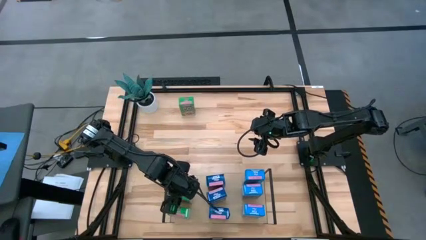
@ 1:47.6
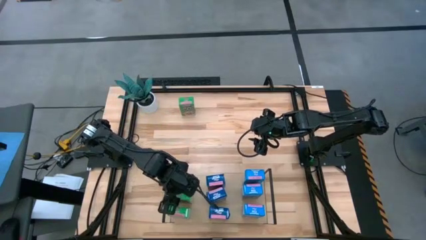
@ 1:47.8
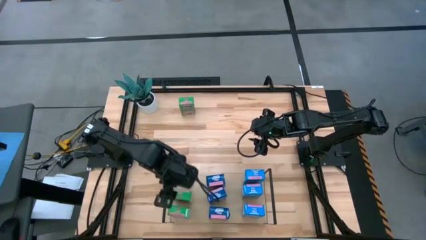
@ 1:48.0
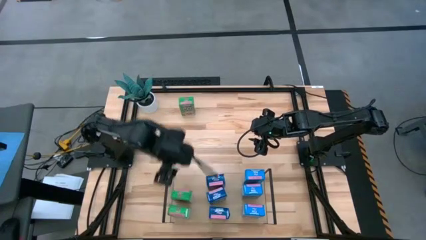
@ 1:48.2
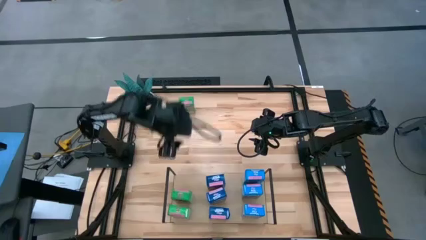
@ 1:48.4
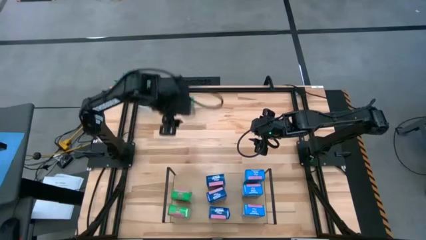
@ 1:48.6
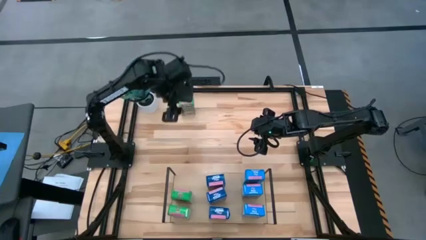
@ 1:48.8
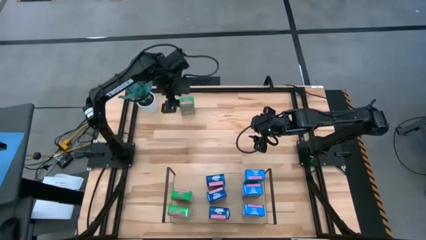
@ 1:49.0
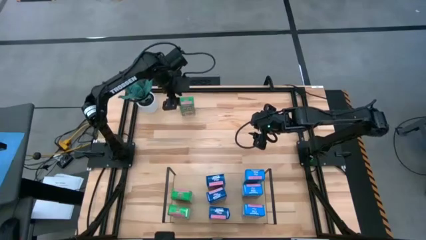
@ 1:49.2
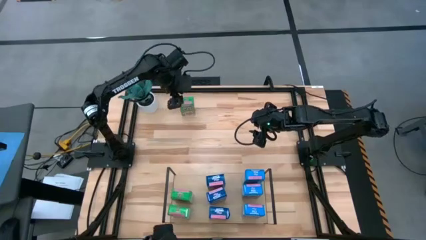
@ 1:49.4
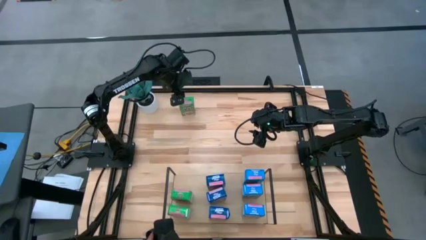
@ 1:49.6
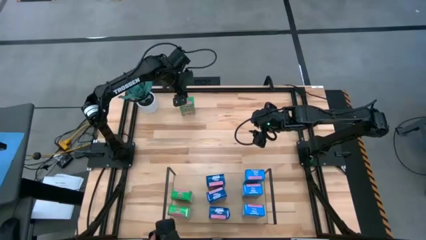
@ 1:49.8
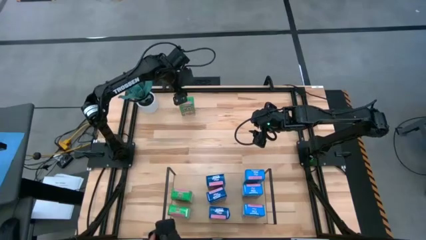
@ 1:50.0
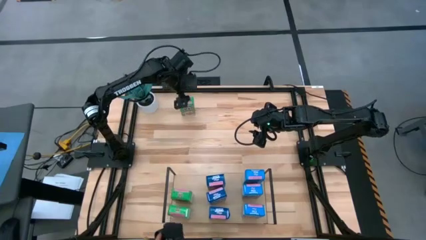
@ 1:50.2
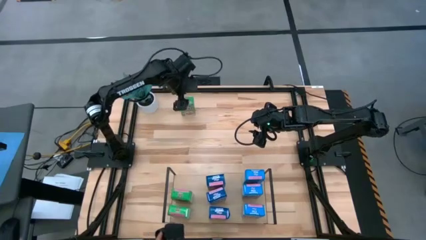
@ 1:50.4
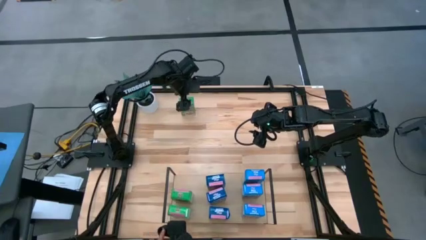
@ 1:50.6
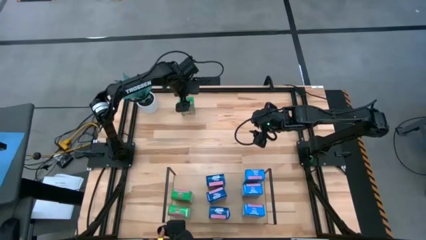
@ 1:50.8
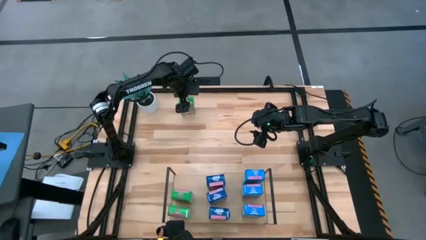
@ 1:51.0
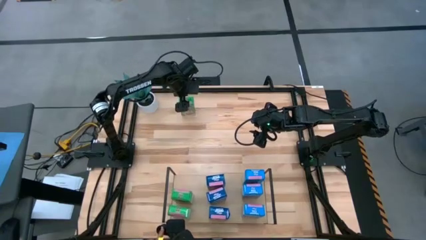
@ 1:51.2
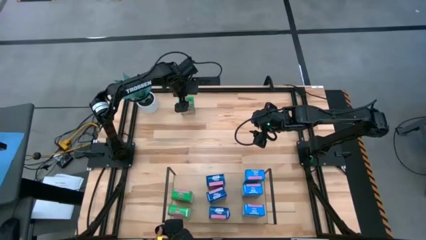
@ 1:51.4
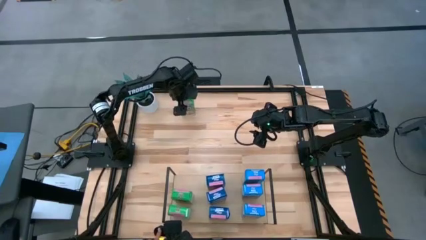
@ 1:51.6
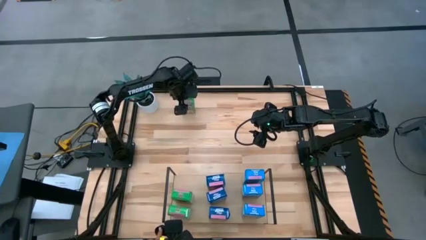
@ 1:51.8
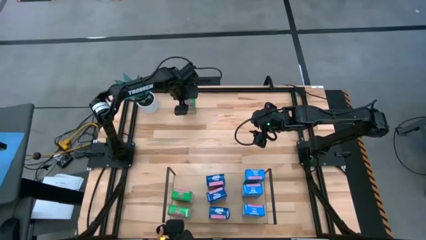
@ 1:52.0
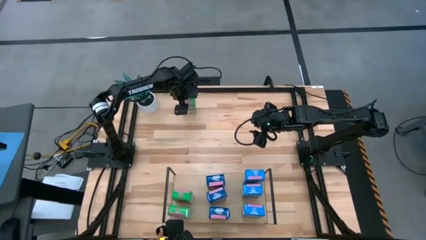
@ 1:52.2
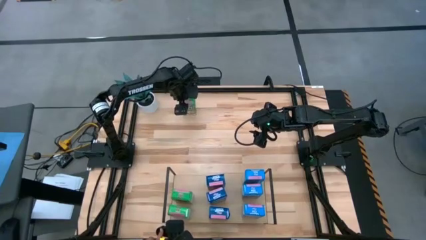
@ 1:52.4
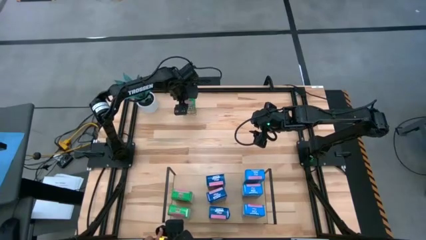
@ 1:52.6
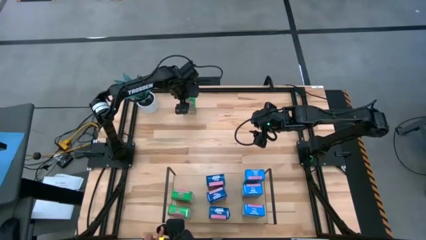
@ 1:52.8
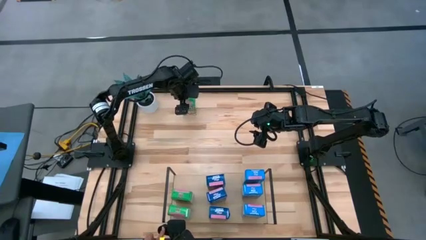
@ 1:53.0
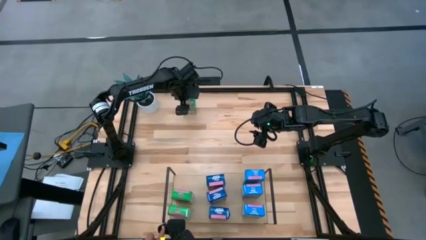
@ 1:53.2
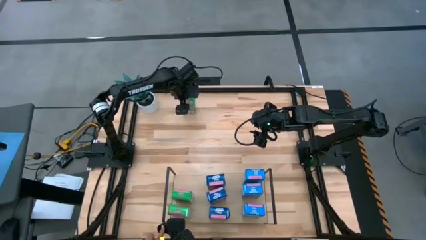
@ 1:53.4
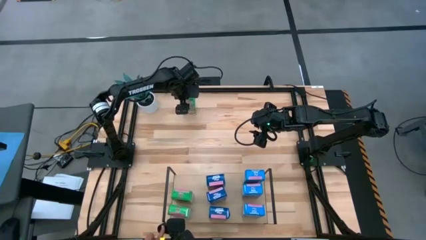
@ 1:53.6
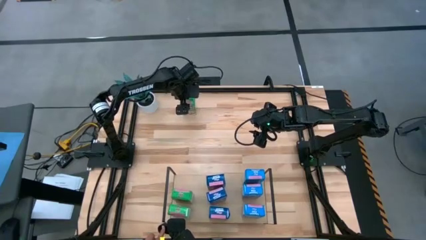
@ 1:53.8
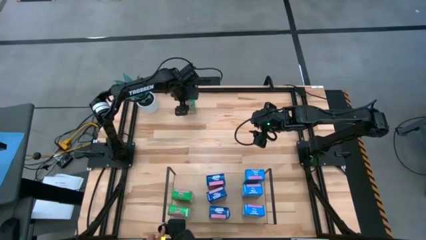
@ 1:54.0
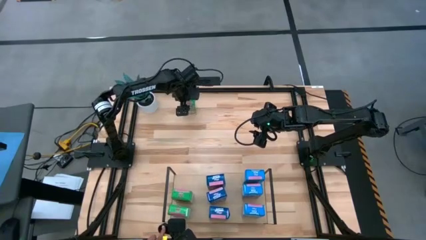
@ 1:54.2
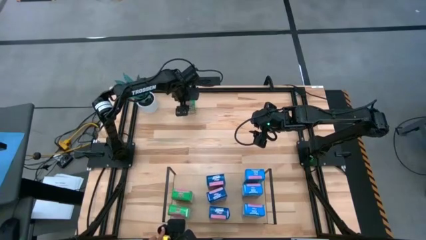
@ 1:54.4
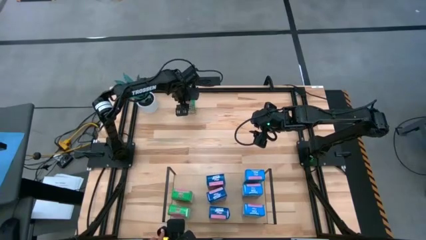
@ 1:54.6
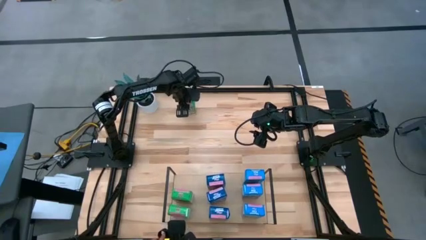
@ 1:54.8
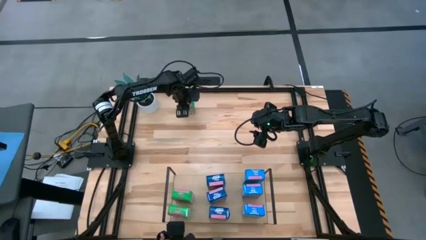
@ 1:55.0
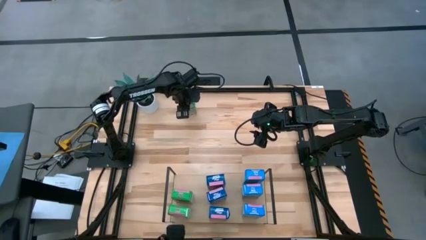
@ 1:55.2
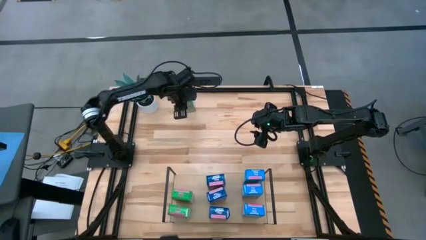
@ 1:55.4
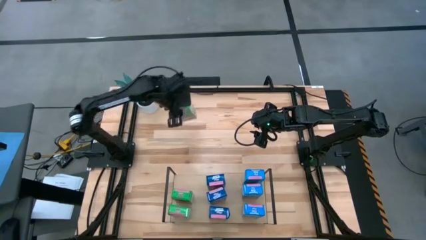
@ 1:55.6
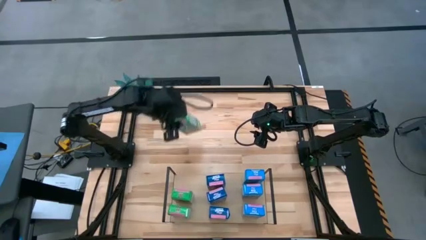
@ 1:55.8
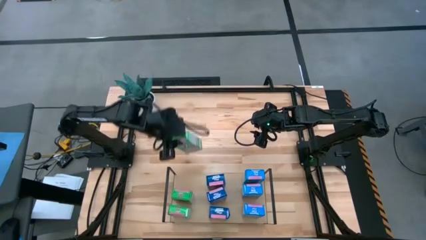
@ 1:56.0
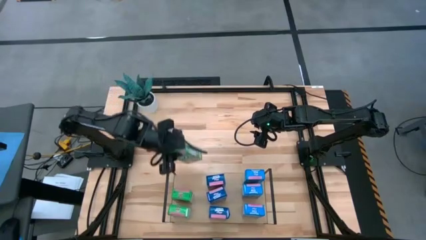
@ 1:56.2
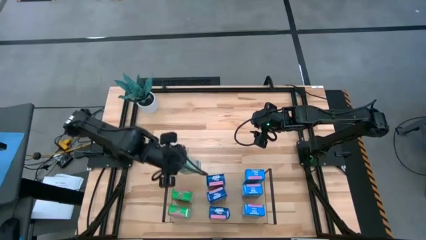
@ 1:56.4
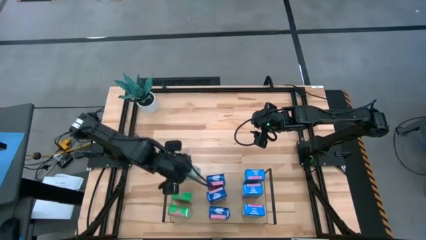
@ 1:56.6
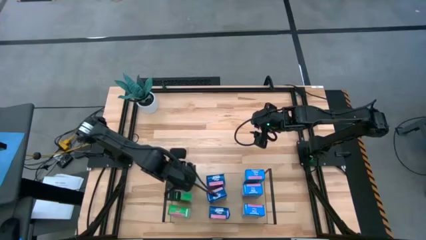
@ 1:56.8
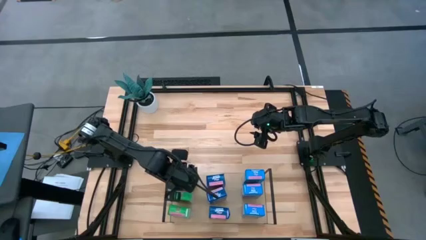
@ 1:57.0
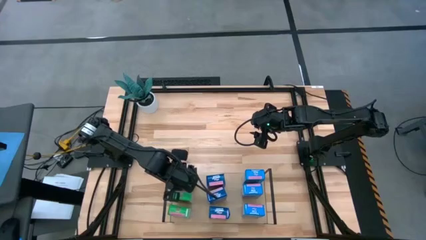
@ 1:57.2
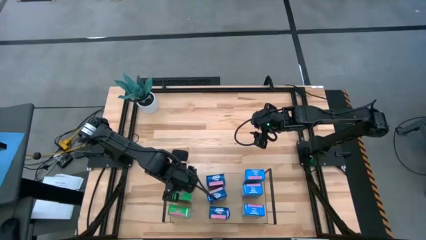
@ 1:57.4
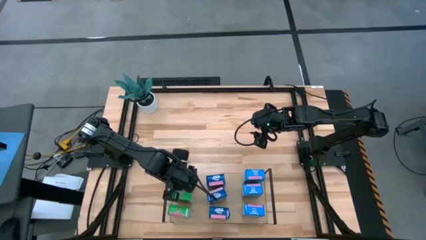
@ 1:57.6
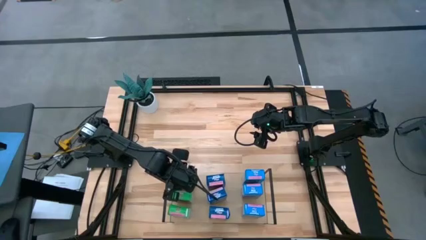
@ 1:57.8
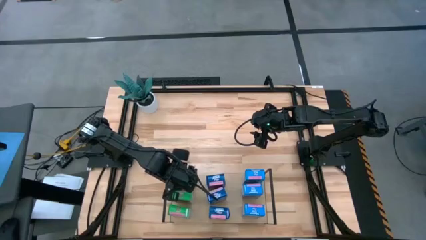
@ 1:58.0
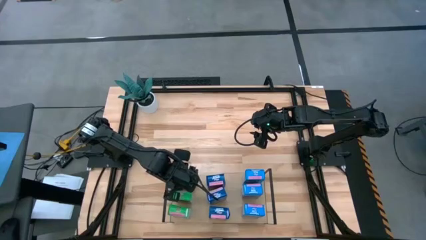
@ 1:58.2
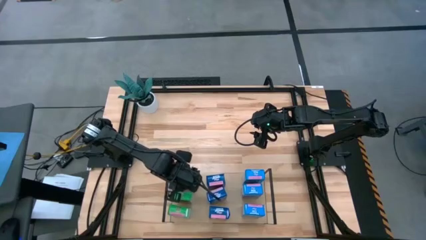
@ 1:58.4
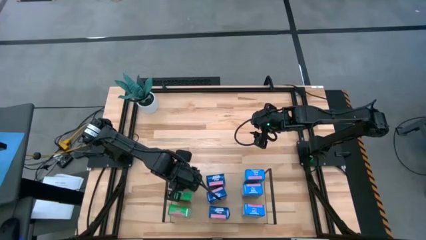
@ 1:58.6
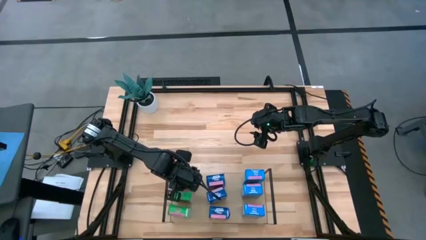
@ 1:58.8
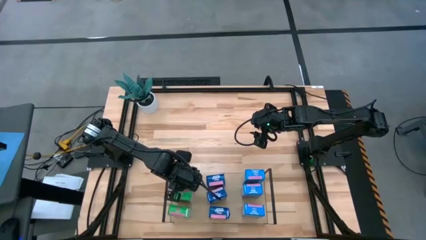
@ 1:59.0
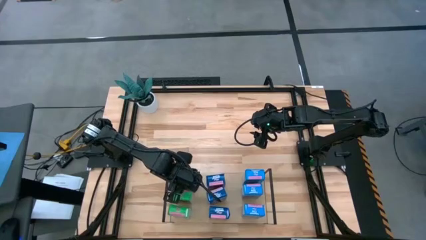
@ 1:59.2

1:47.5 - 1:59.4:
Task: Stack cereal on shelf
Put the green cereal box on the shelf aligned with the other green cereal box

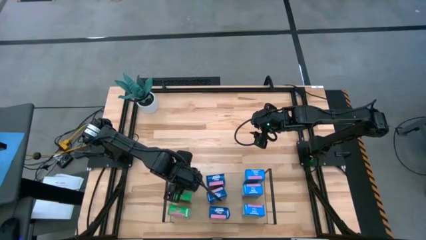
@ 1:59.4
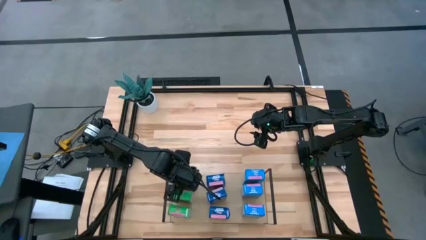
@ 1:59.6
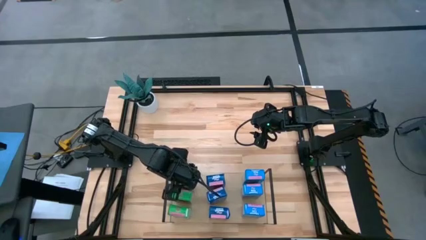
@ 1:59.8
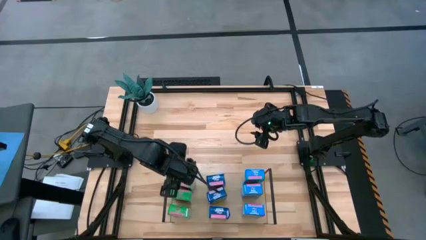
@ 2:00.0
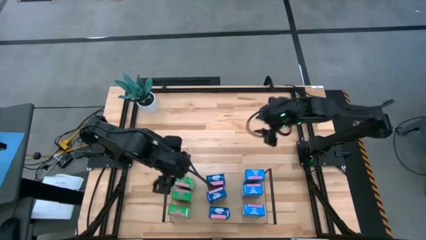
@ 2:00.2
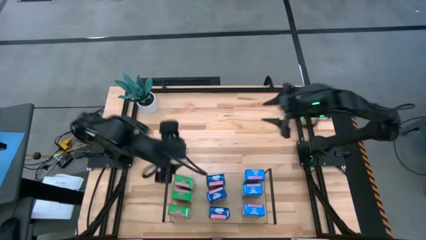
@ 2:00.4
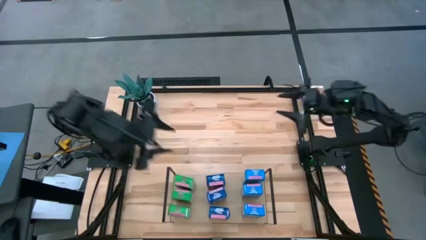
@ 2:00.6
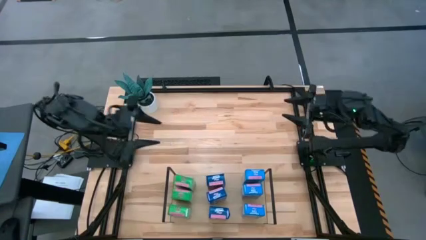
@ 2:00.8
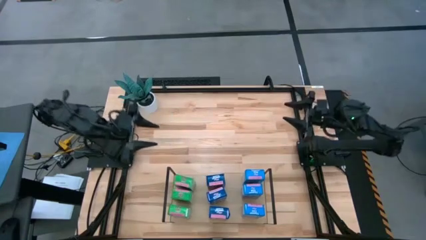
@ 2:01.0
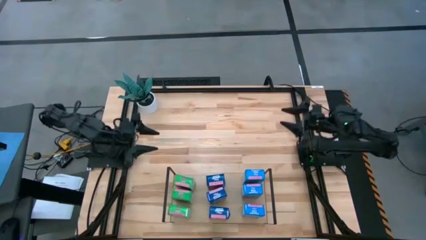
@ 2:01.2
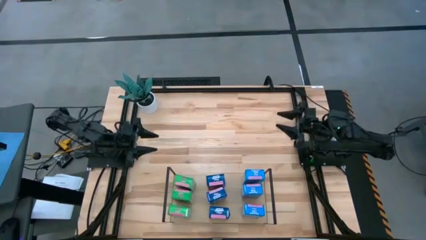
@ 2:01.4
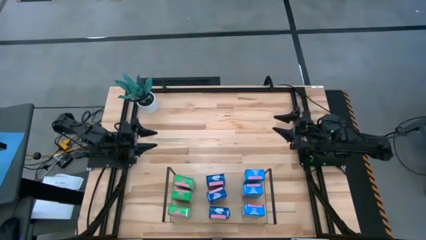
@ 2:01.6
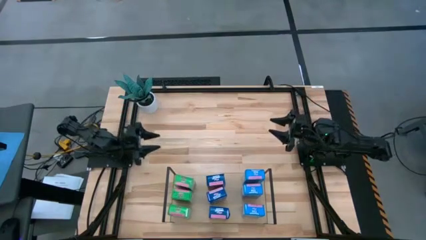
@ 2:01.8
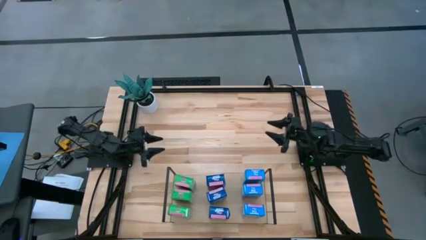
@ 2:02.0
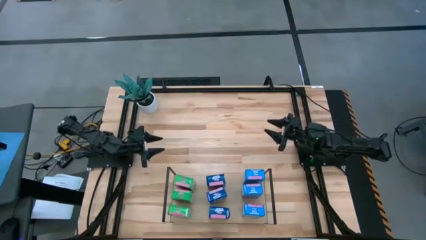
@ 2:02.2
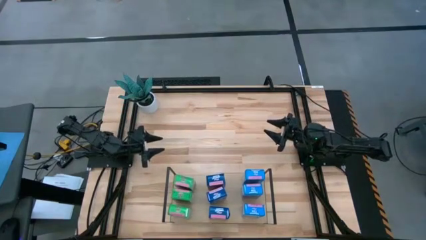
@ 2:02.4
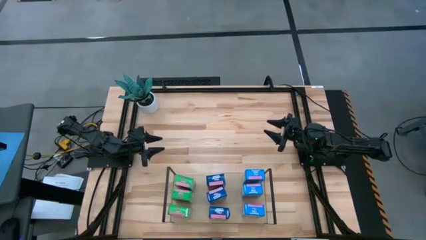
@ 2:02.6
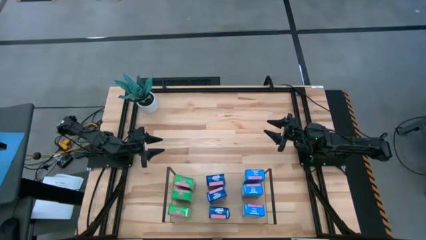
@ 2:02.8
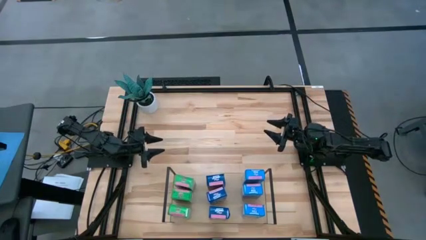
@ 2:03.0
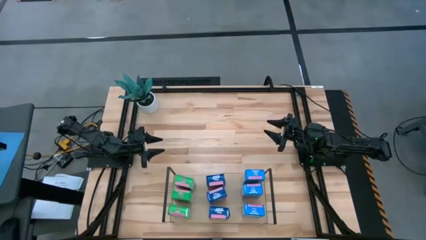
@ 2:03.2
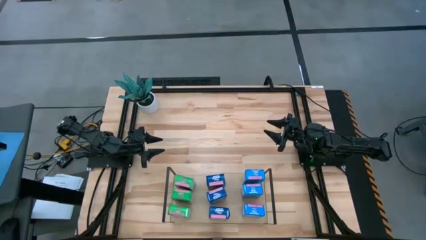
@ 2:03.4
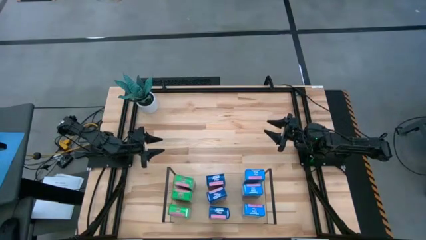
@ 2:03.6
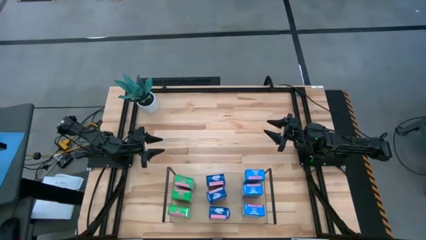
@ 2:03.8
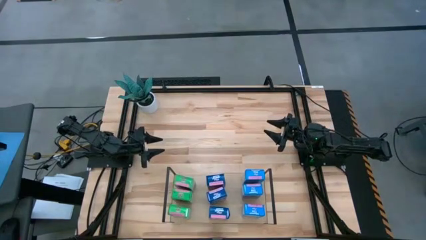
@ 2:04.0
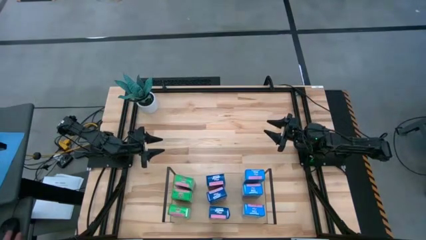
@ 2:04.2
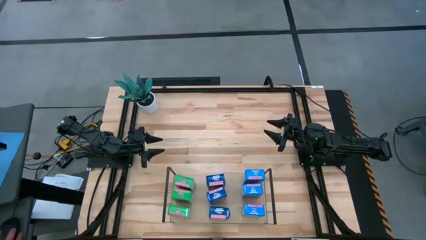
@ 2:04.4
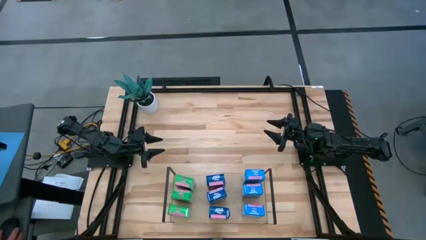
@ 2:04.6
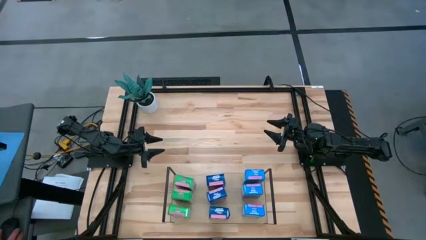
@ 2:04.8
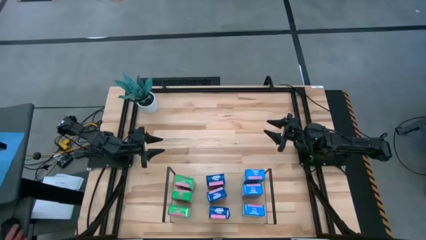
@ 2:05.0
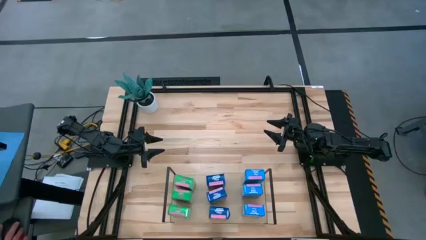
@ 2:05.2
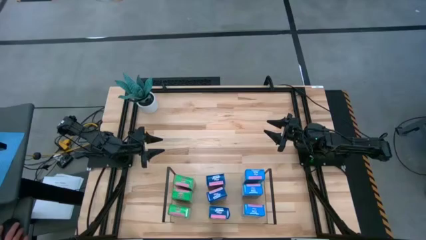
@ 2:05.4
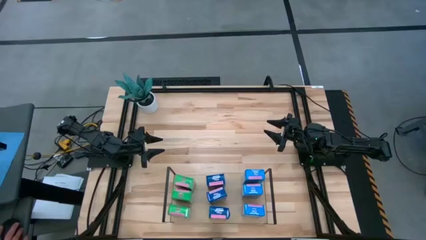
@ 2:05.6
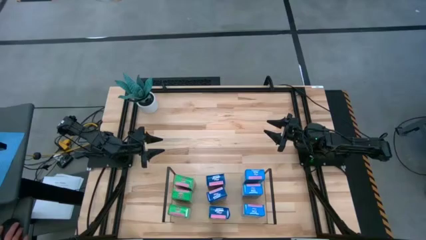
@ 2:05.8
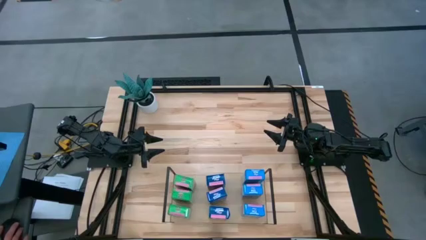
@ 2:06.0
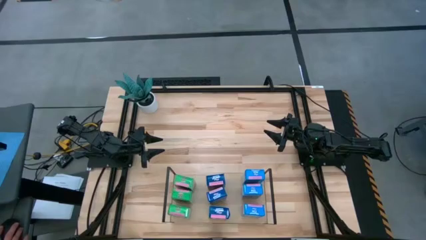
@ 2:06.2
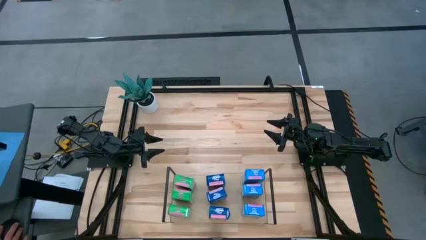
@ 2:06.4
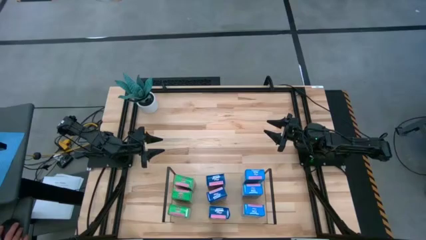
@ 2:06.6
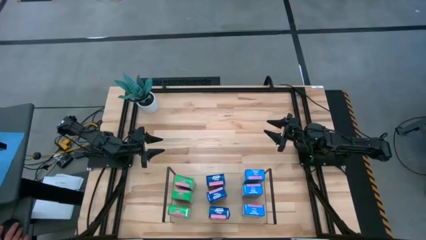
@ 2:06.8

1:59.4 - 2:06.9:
Return to Home Position
